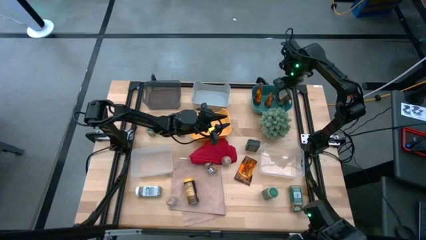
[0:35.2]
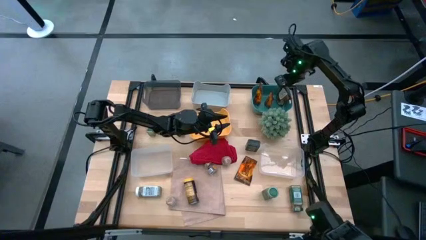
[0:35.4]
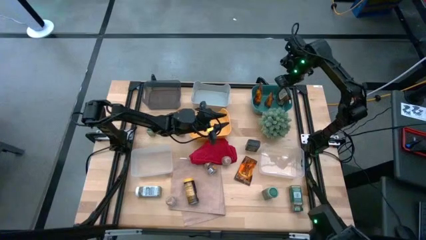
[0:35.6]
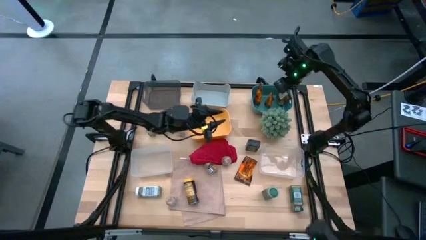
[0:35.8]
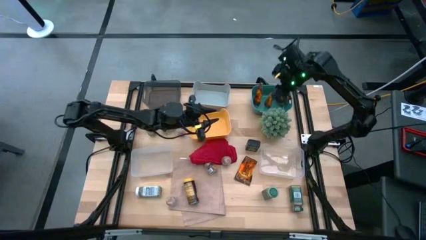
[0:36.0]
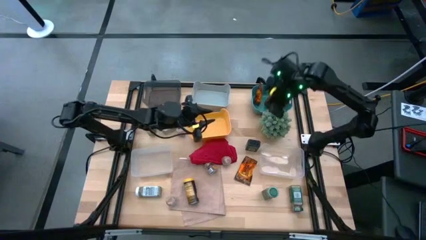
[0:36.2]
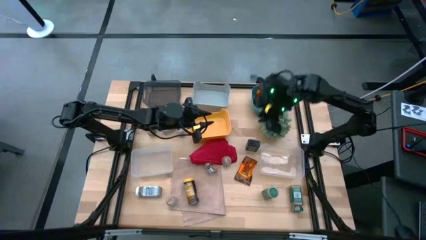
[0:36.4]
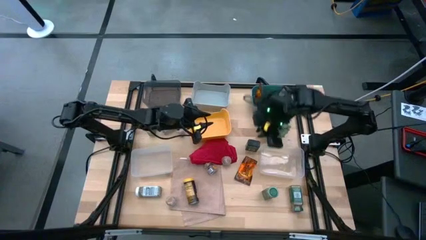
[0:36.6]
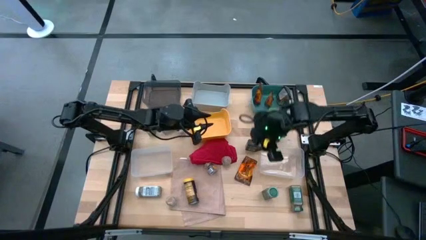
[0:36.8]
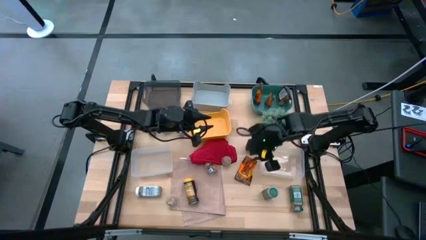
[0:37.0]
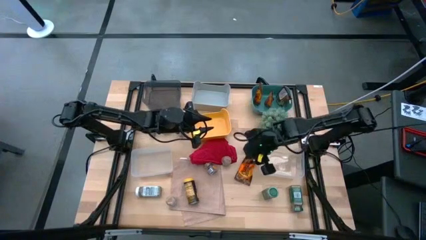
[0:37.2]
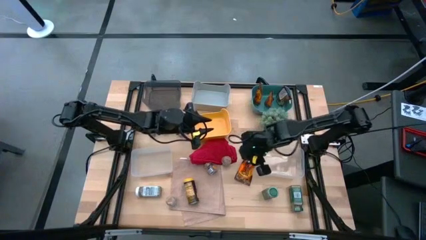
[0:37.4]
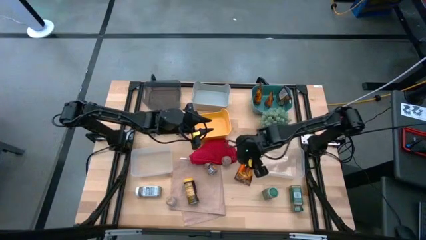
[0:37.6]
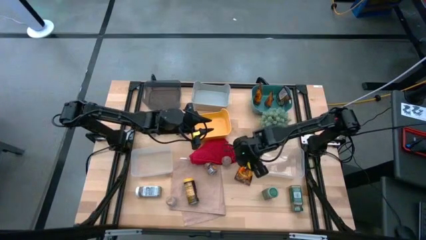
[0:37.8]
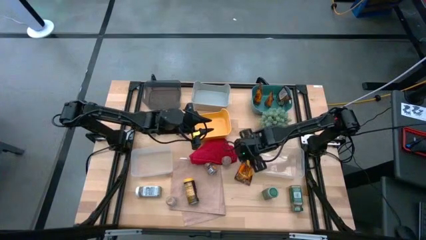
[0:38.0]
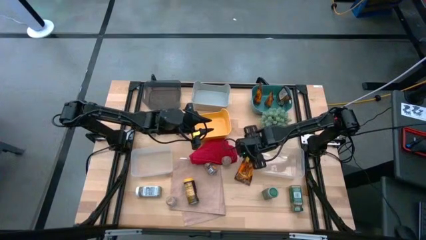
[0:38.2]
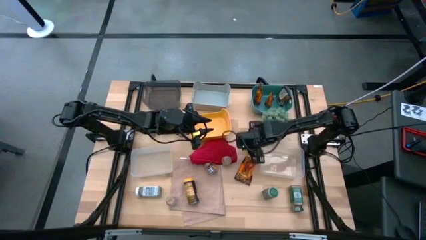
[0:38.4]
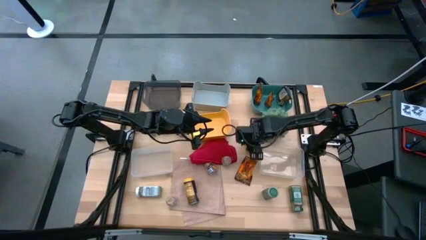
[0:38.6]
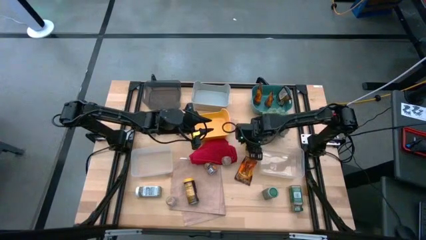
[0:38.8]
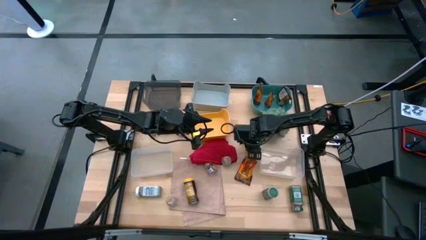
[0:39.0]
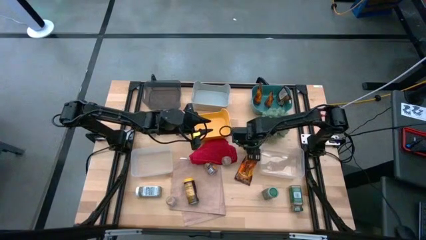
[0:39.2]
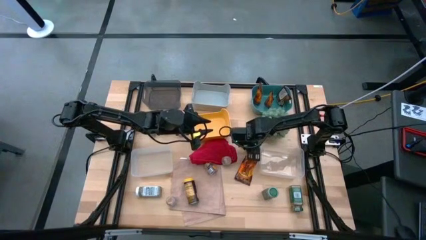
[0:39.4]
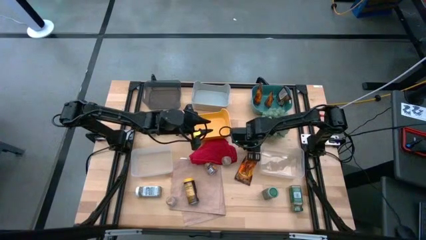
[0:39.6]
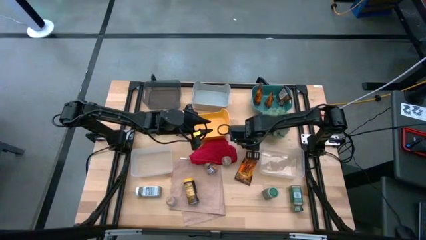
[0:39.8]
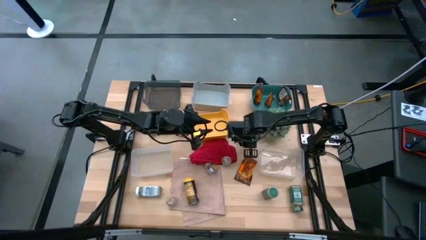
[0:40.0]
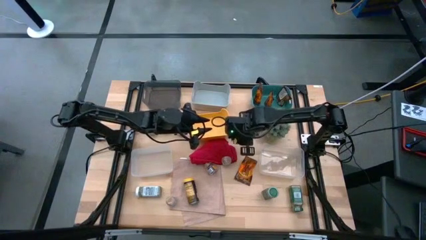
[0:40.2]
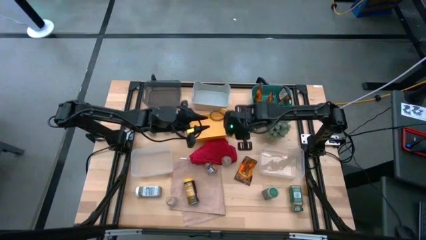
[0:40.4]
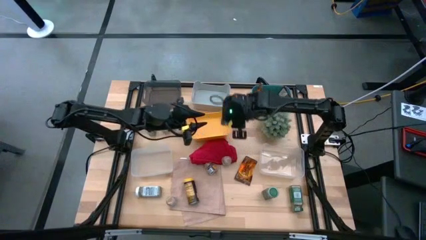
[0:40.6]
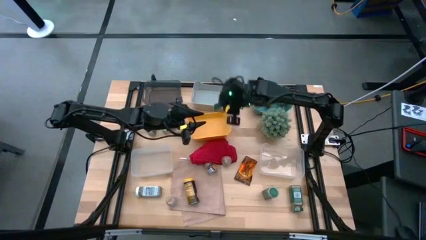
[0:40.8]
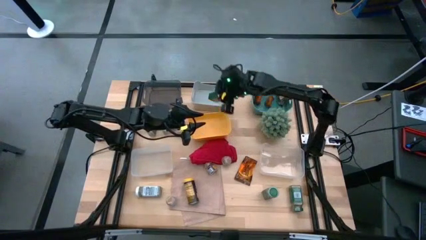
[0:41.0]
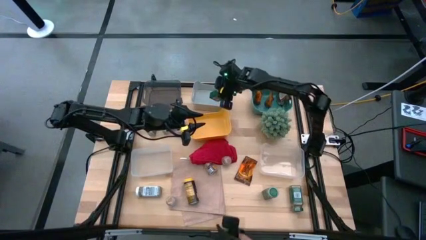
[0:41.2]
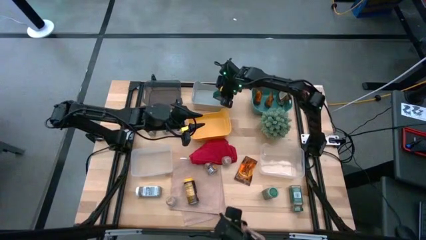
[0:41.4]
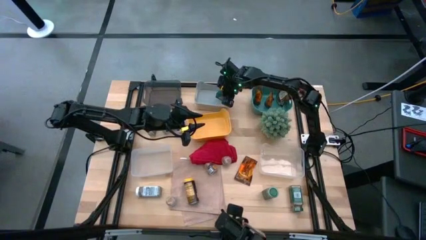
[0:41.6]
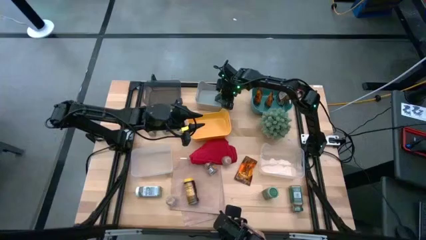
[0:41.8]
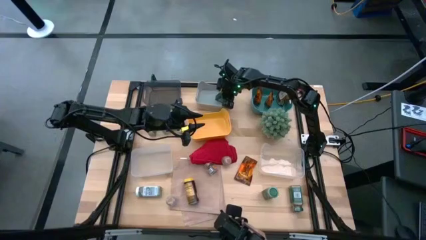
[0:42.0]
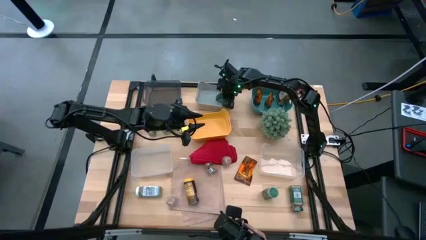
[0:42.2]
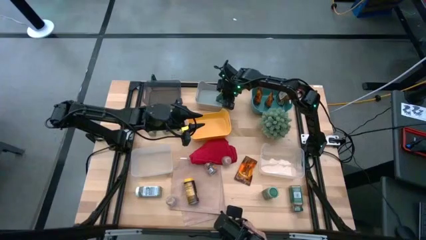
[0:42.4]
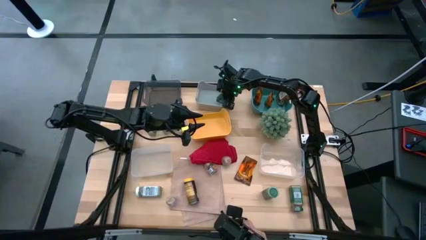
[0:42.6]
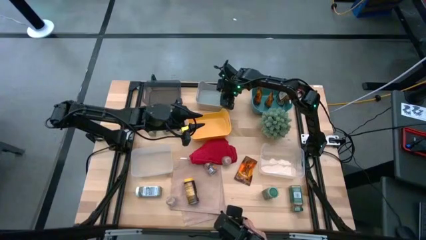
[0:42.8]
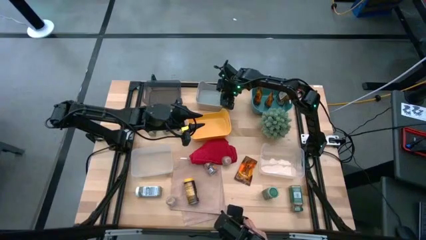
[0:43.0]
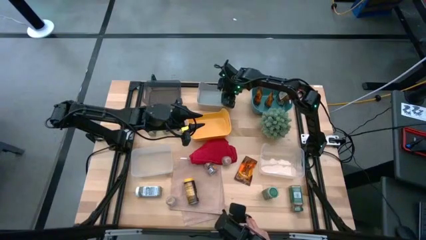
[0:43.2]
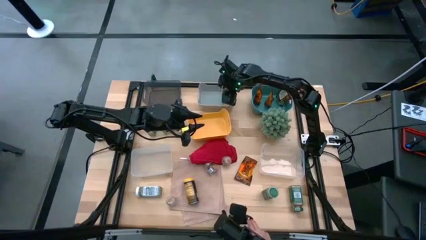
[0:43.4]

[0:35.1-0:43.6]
Task: Sort spices by type
Put the black seasoning can into the gray bin

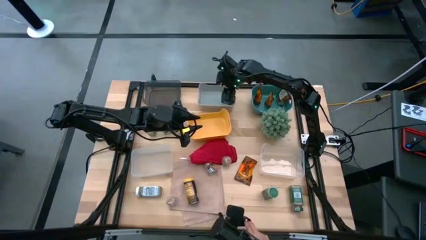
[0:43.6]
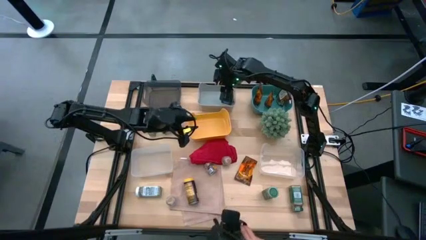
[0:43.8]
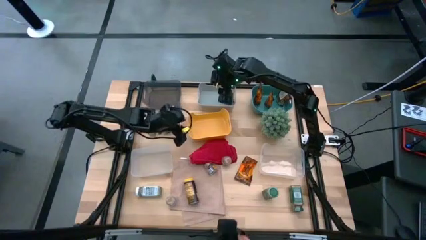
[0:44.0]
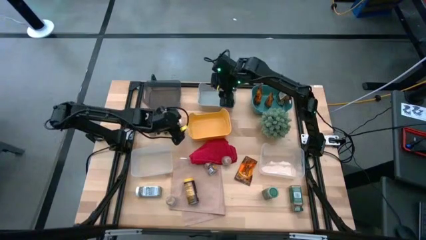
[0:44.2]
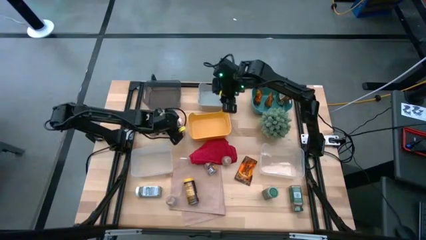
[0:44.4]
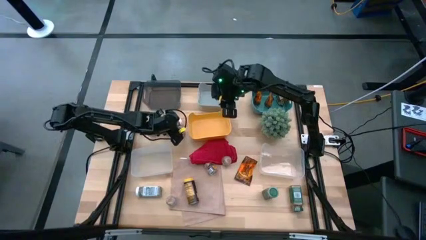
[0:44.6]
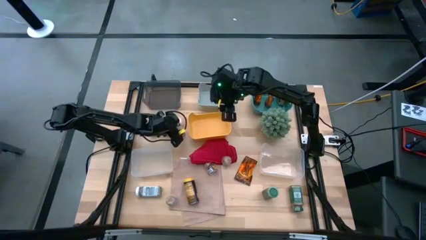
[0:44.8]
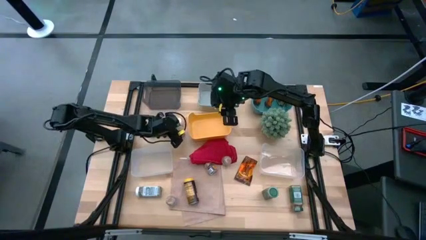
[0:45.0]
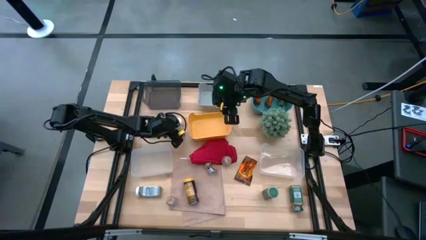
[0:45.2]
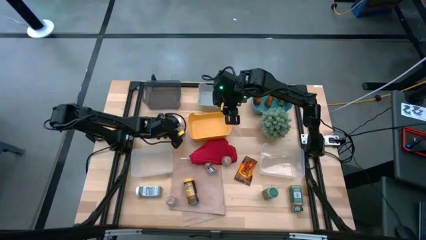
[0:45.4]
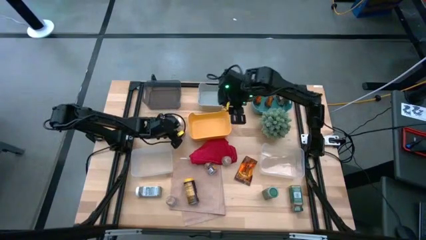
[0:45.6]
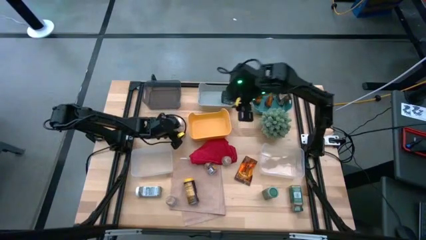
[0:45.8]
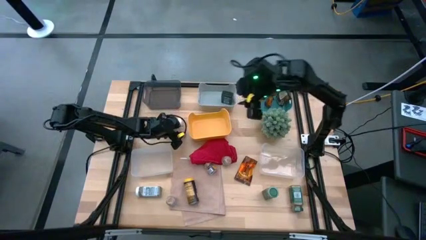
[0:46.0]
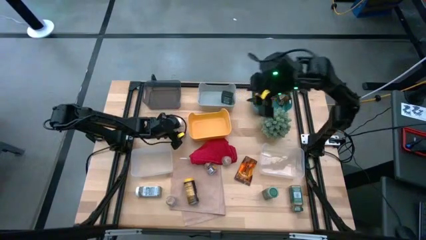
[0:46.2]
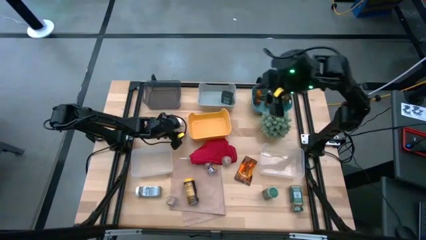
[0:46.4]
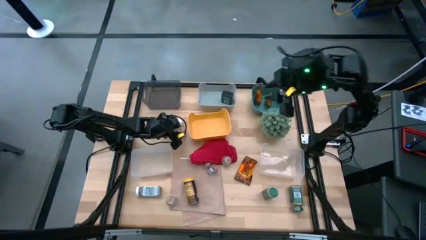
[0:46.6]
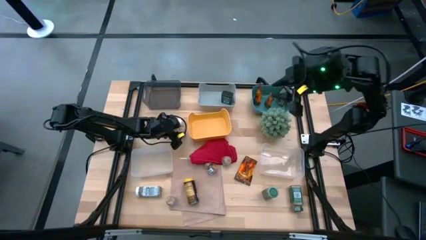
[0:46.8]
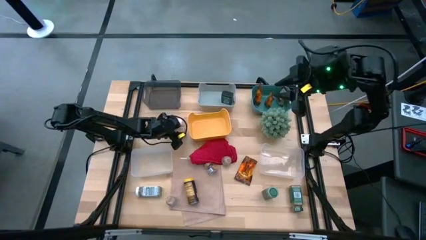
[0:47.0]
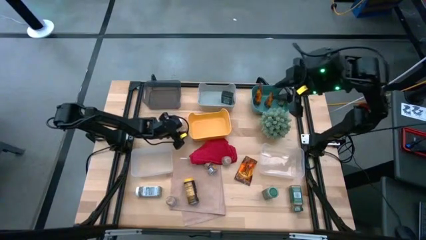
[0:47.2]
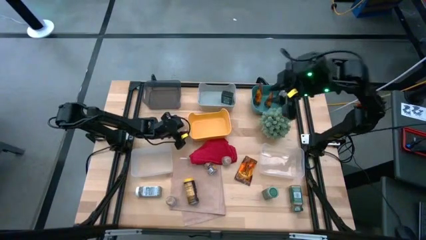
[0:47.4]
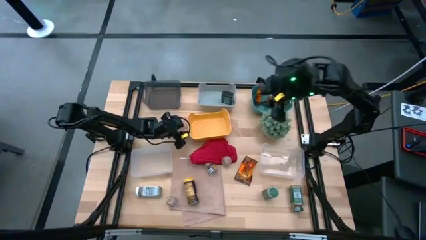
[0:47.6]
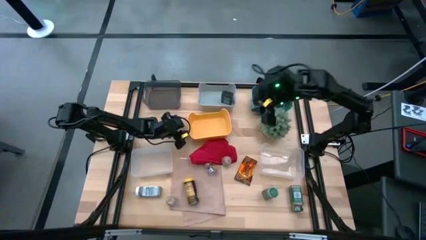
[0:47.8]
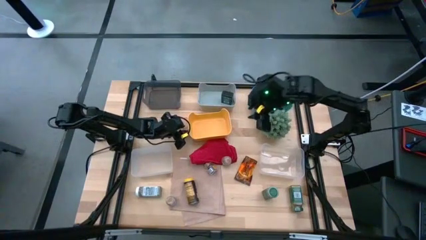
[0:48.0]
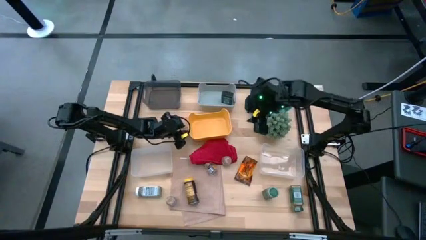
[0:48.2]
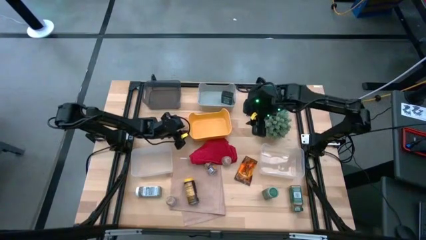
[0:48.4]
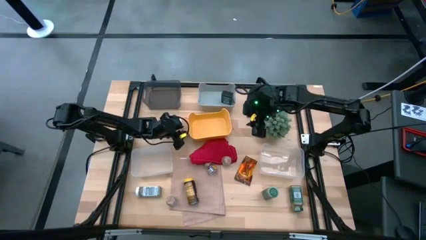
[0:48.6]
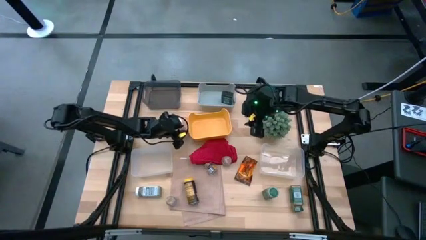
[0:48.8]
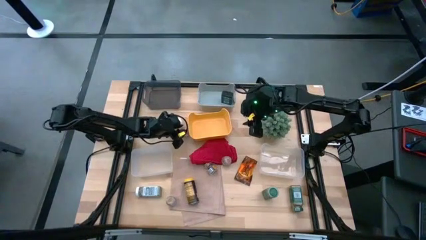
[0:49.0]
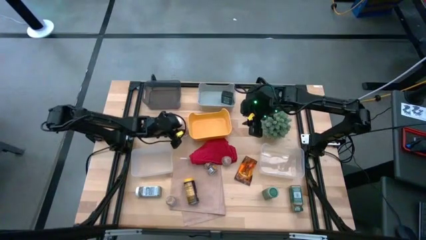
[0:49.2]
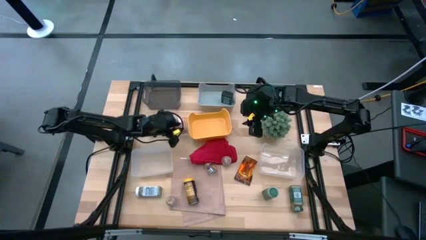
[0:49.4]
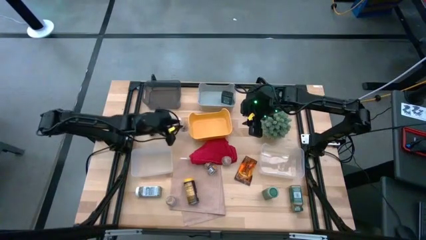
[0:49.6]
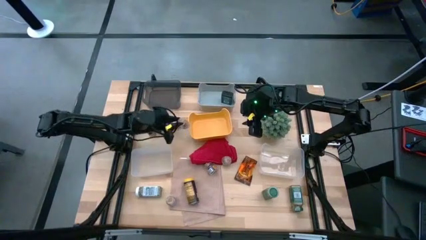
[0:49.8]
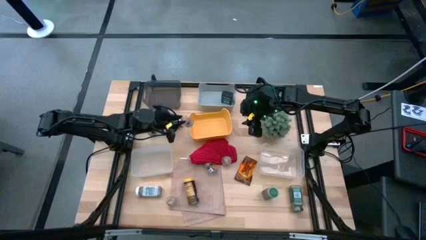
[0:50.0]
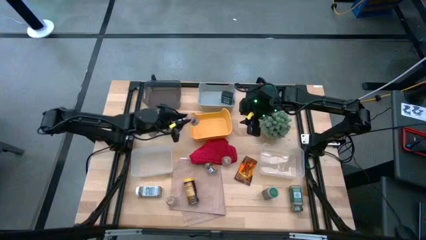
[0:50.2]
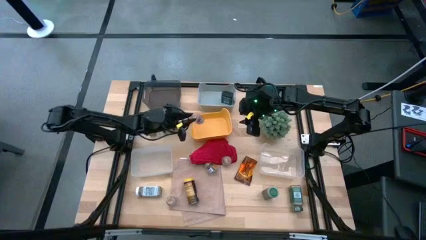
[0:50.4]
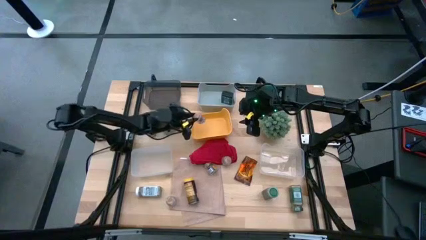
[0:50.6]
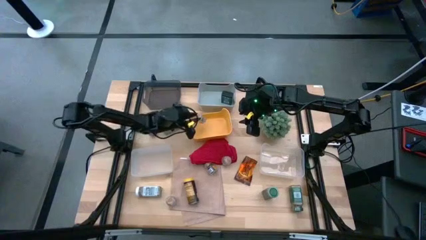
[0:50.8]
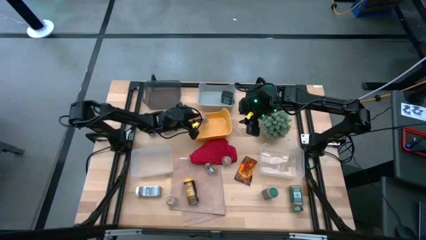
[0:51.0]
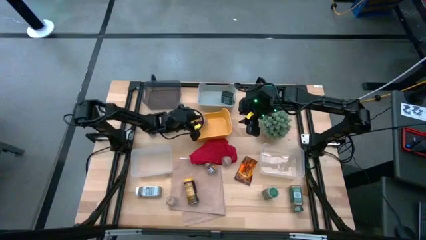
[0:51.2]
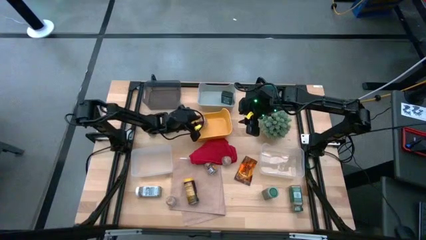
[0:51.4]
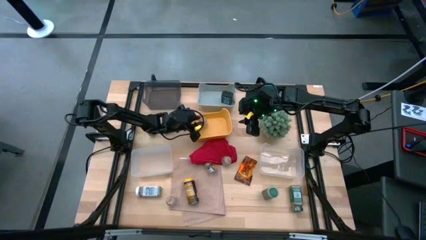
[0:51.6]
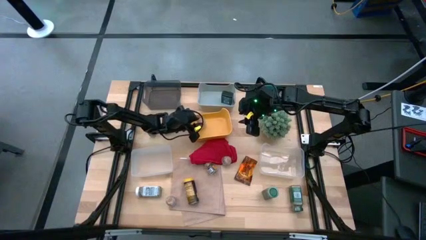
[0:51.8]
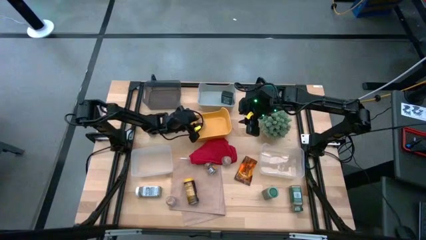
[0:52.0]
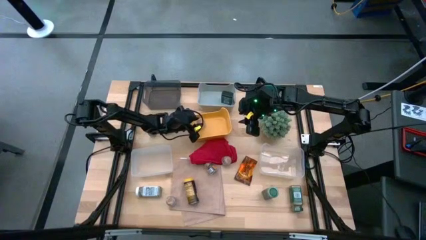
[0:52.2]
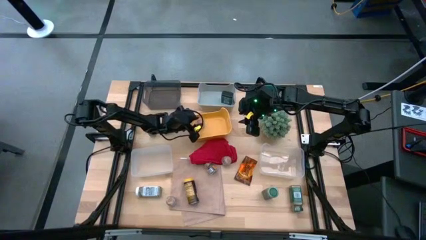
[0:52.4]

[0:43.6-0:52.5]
Put the brown seasoning bottle into the yellow bin
